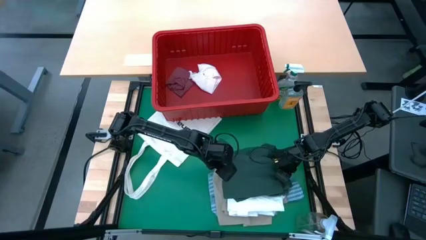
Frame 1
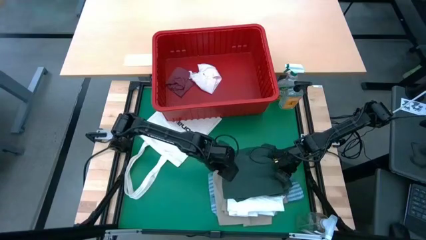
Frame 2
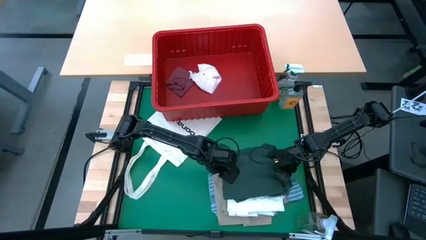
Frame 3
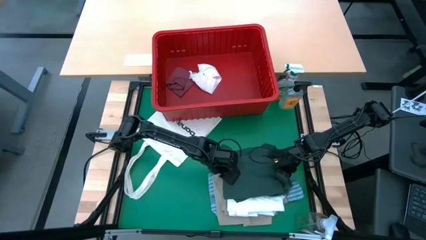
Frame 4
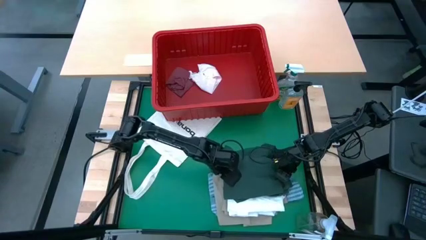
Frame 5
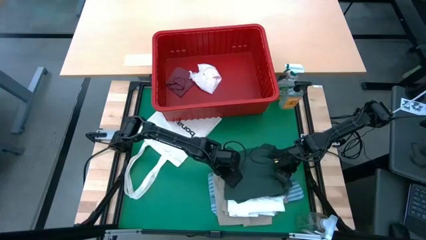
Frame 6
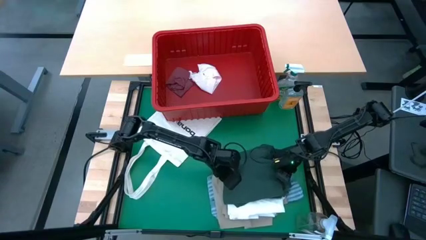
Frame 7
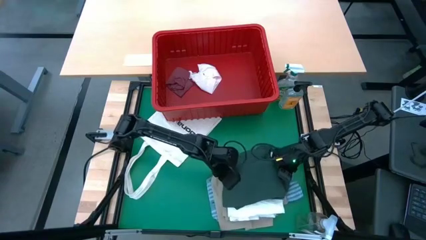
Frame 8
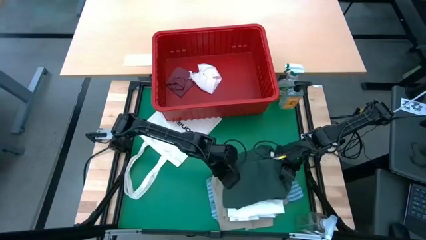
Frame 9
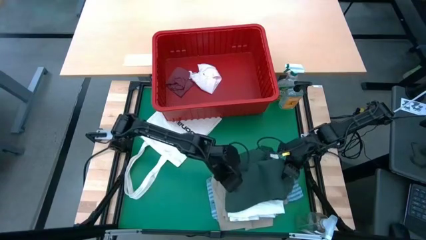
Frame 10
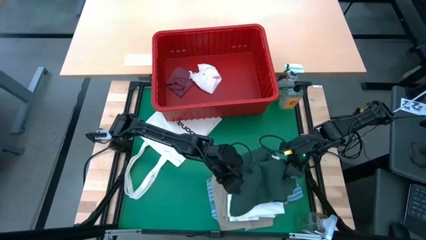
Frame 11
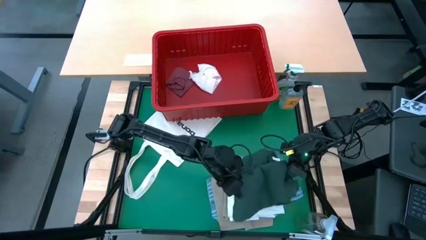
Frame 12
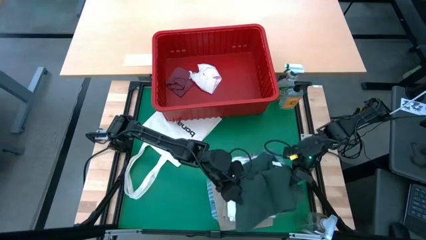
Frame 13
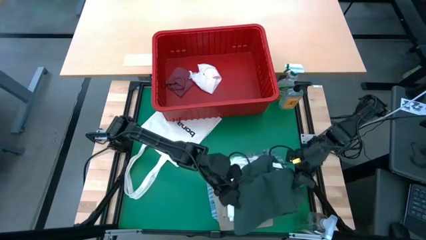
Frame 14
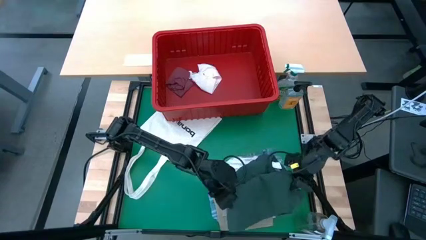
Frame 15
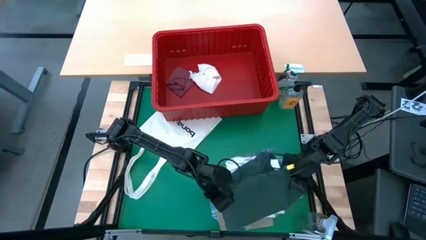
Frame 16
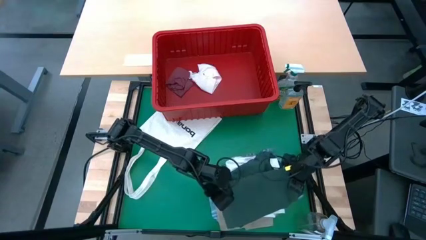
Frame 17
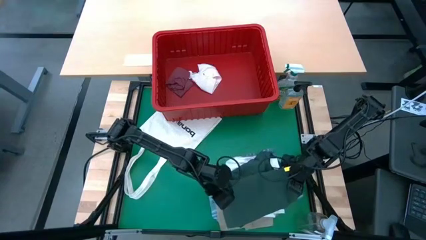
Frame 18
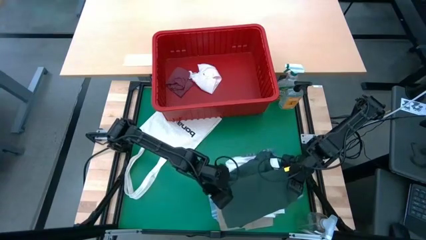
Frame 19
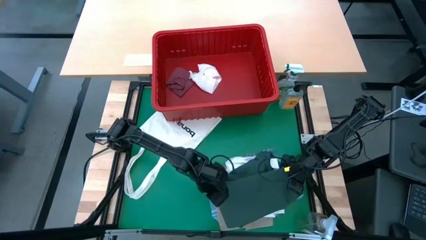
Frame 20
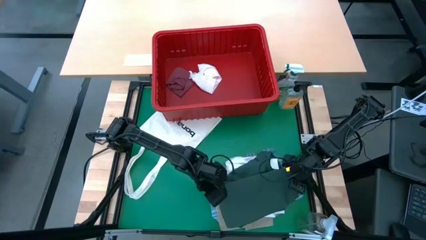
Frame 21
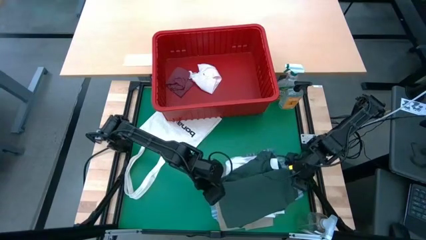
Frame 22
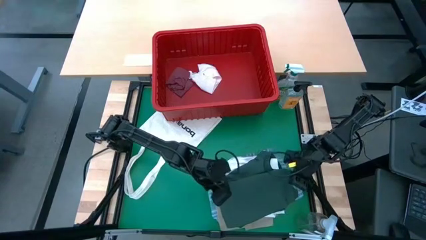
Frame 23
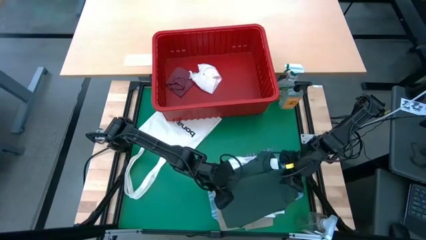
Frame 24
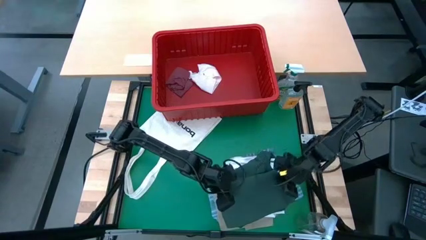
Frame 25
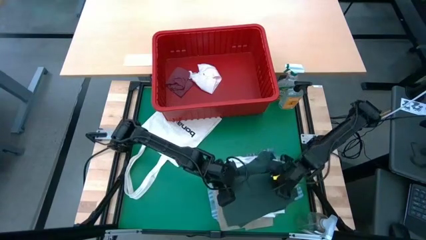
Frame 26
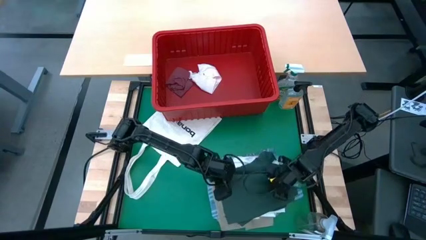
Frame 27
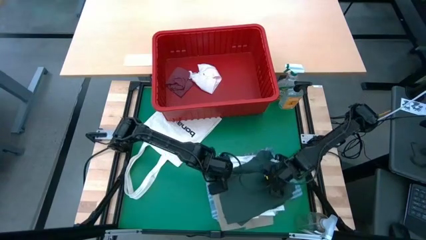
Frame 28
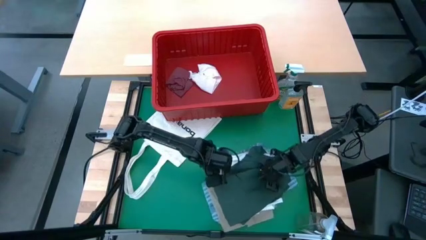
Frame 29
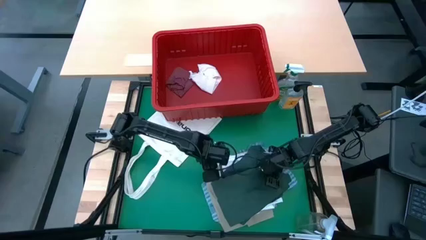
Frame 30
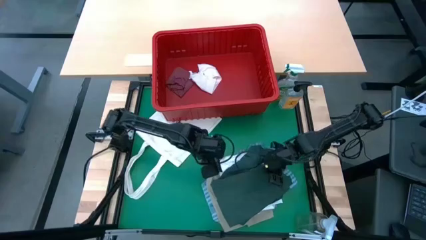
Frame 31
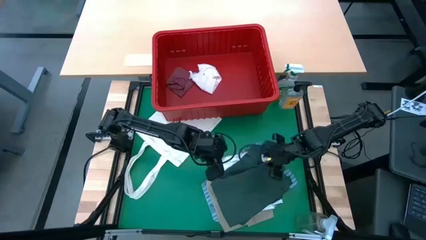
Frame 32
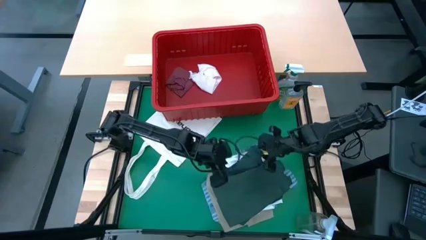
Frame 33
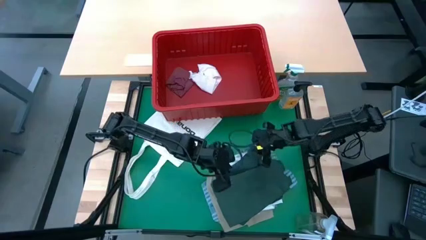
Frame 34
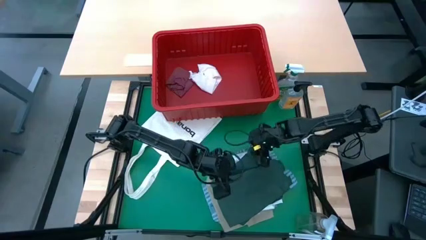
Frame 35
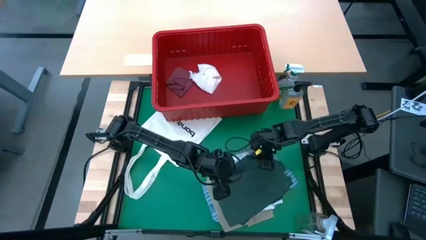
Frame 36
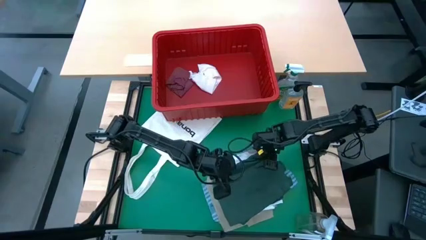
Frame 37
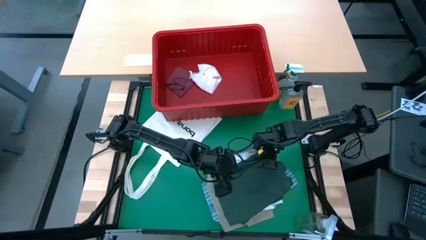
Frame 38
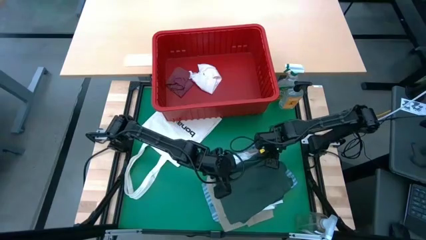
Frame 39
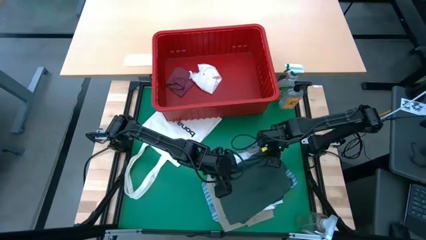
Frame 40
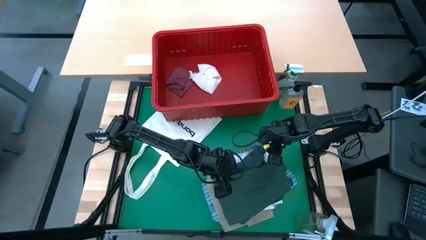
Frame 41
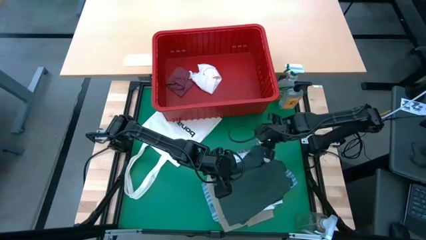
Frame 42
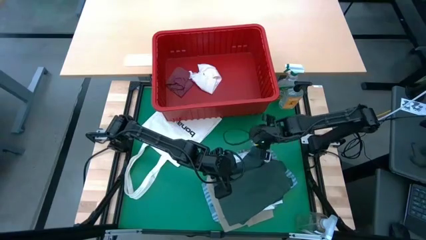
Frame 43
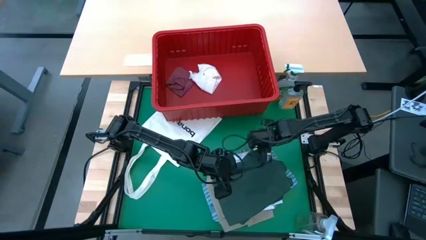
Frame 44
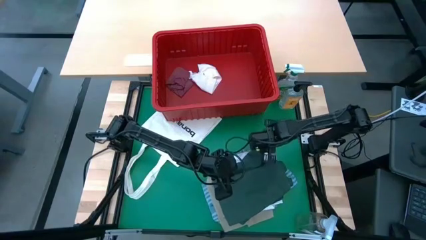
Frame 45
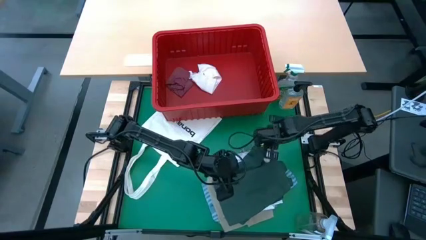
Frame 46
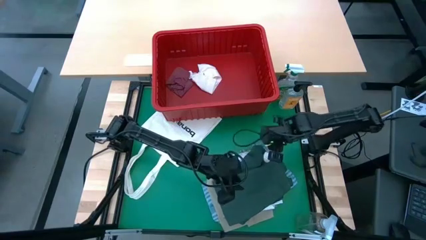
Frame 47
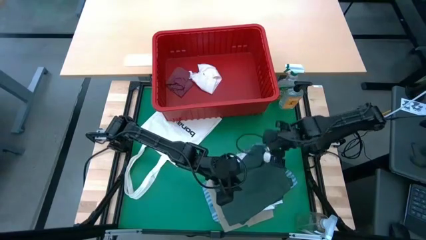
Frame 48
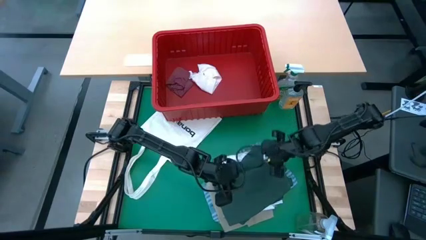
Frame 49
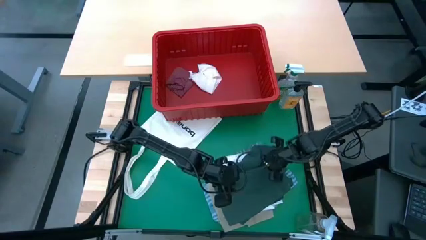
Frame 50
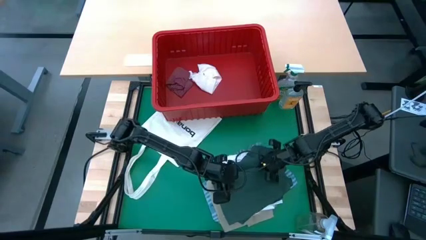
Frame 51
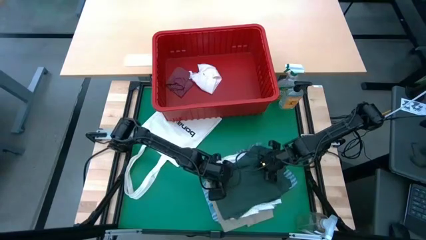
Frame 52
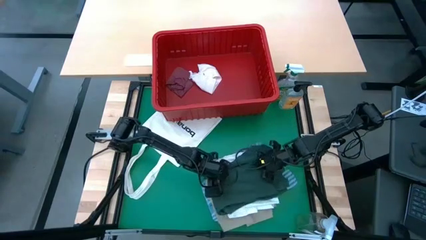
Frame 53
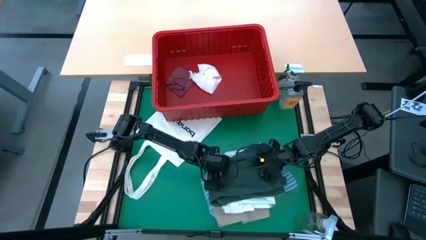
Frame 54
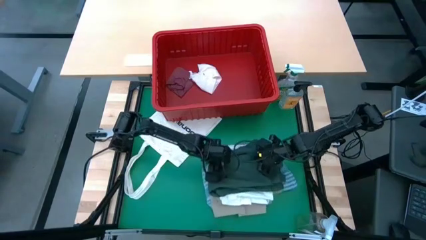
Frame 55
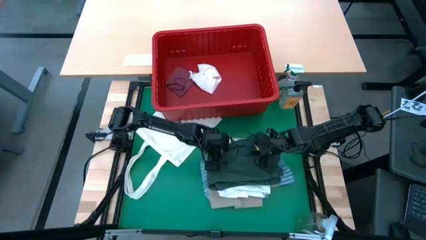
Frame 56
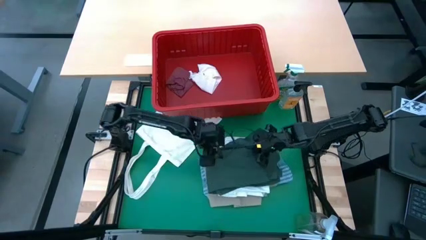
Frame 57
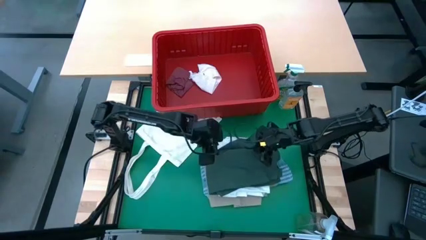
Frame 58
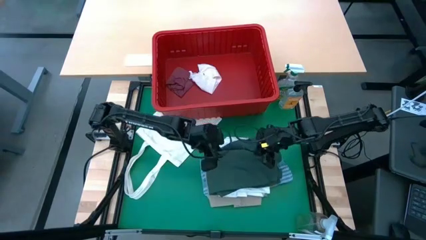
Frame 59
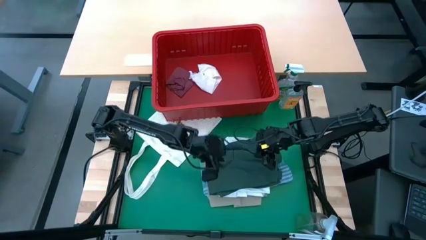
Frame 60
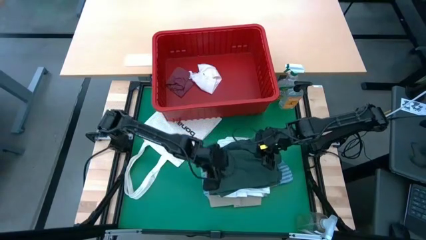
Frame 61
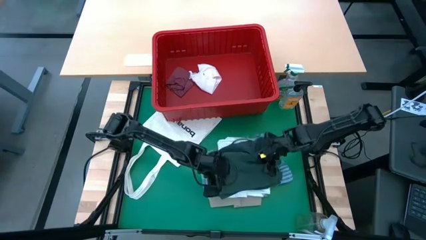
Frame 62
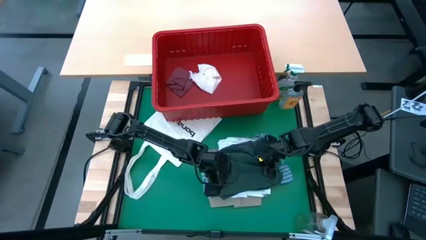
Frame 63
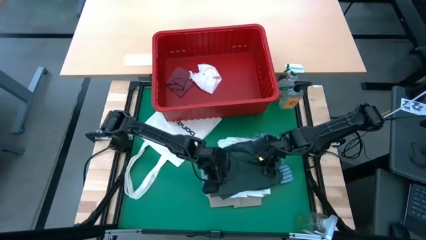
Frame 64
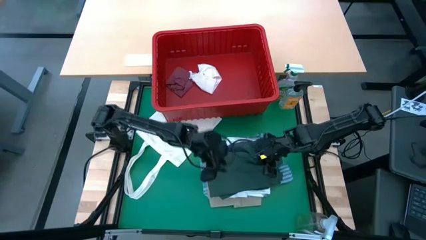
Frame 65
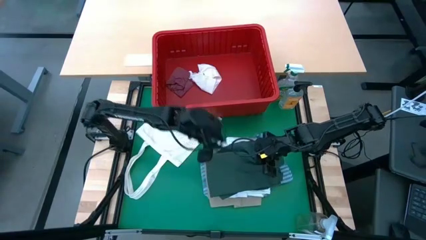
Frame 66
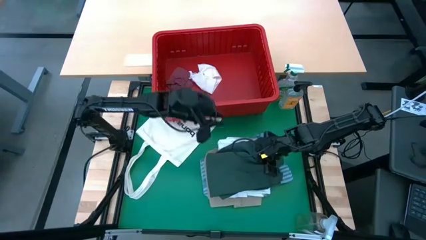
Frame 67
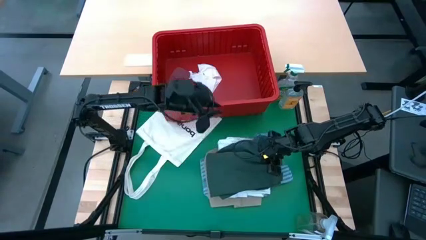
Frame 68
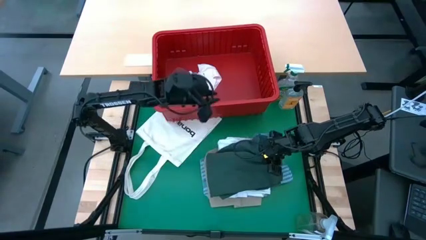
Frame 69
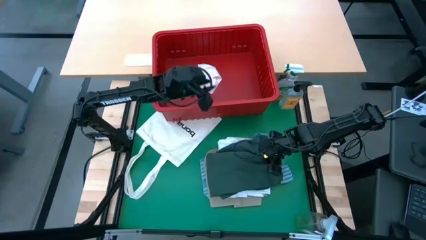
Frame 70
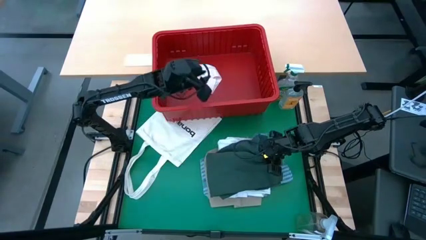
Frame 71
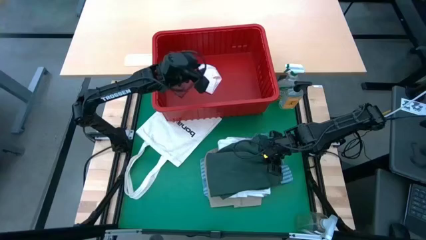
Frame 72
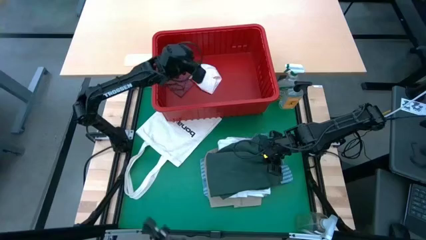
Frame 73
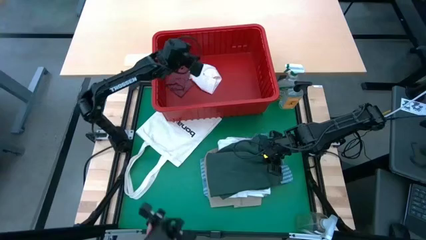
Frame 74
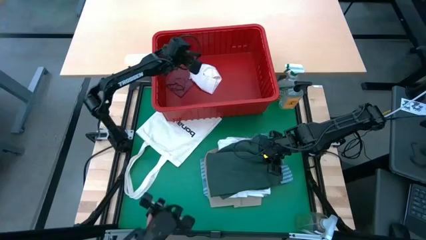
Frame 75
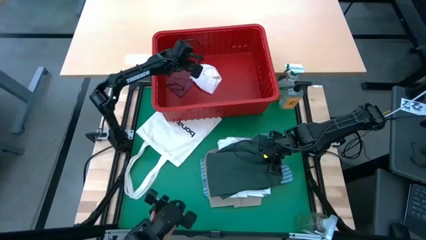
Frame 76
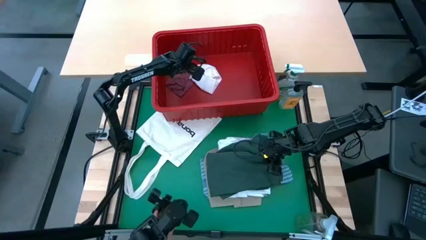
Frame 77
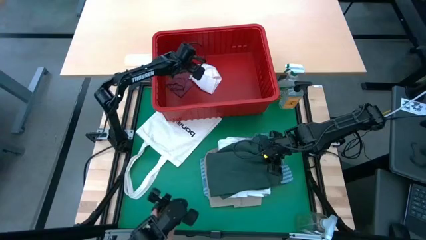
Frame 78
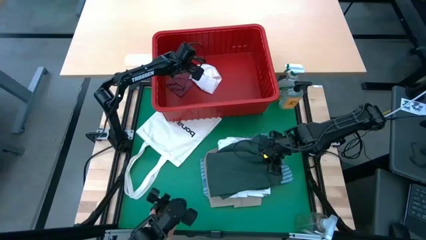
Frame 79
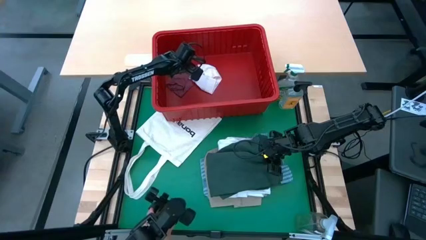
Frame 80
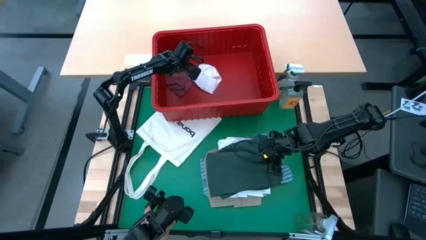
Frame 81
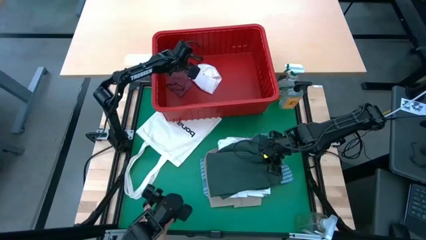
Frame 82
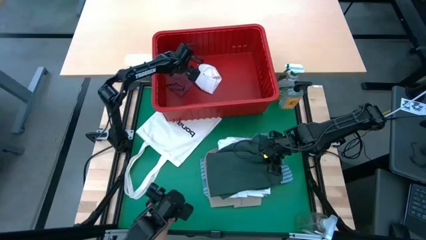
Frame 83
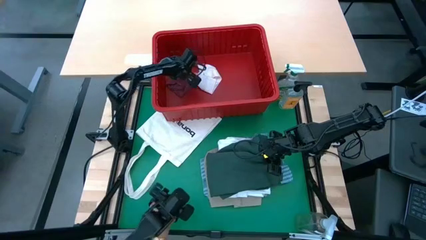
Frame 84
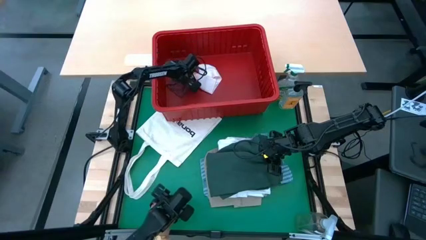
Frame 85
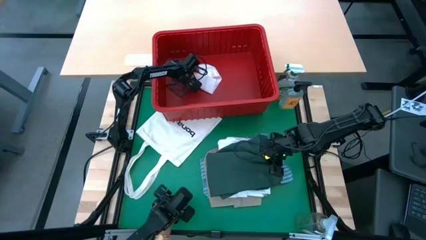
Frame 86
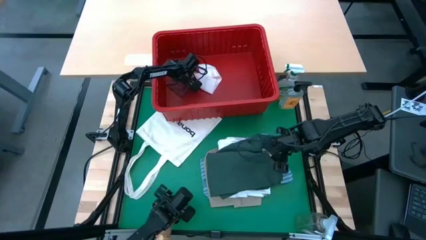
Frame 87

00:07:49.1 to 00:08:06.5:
Task: Fold Laundry from Bin
Fold the green shirt
